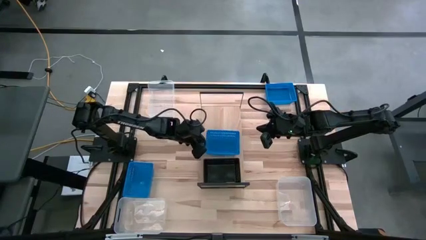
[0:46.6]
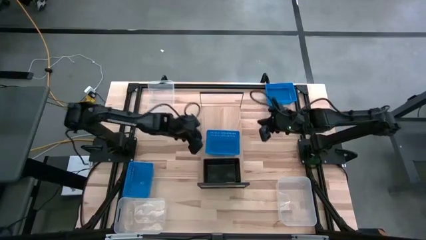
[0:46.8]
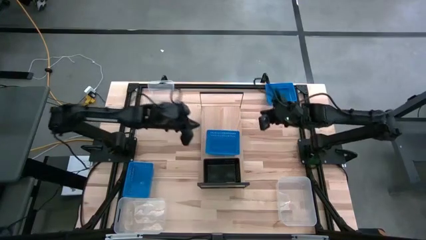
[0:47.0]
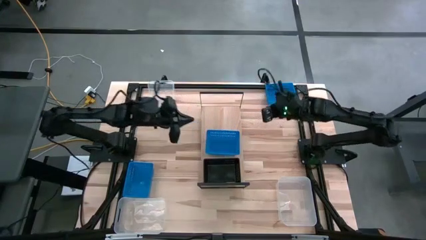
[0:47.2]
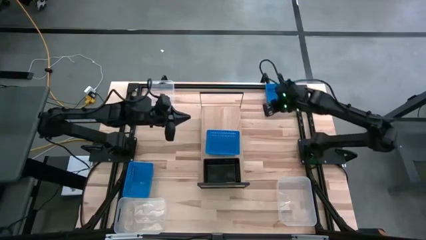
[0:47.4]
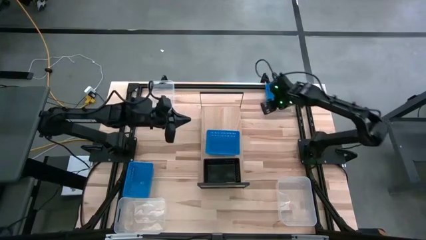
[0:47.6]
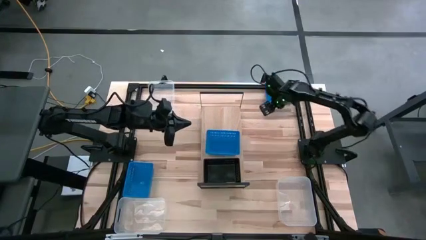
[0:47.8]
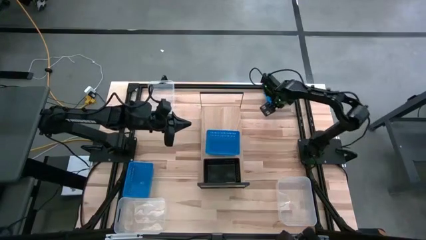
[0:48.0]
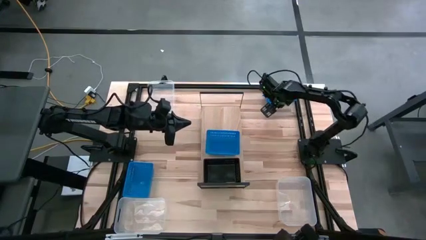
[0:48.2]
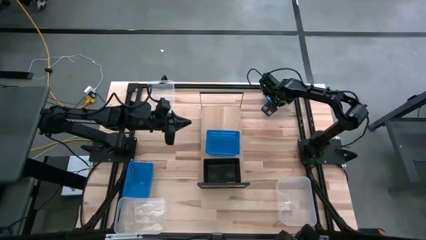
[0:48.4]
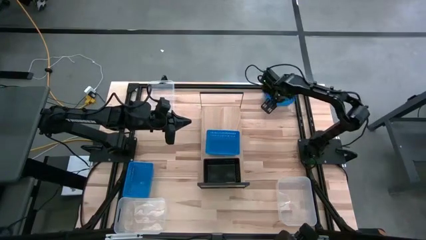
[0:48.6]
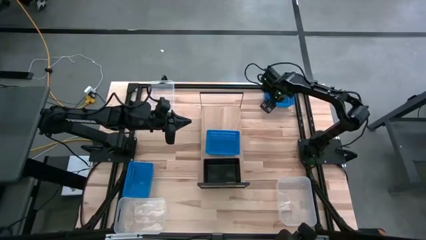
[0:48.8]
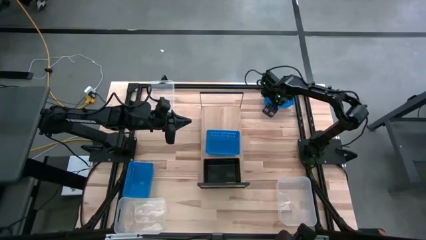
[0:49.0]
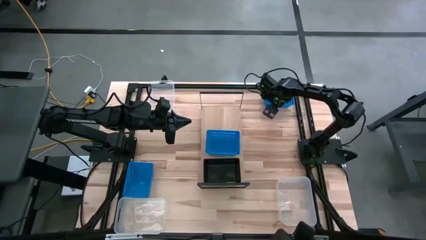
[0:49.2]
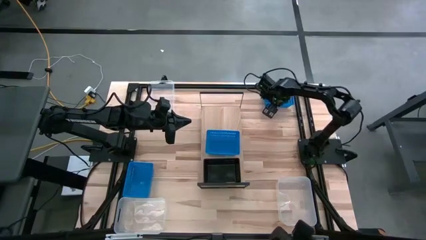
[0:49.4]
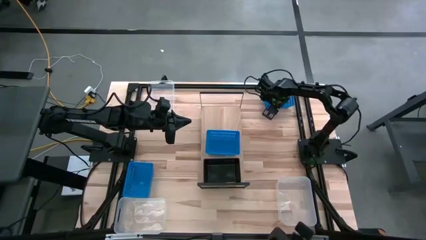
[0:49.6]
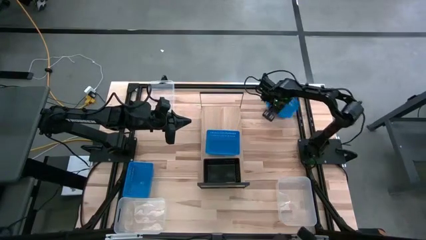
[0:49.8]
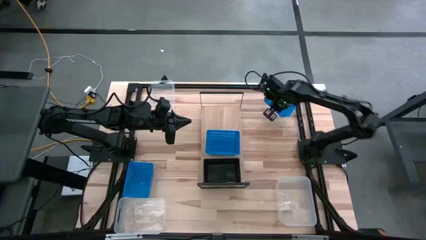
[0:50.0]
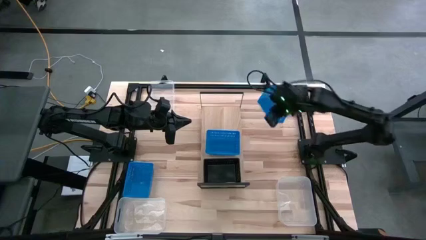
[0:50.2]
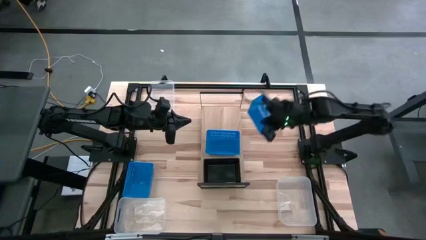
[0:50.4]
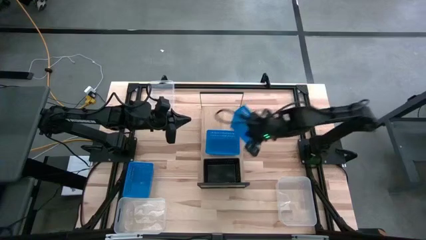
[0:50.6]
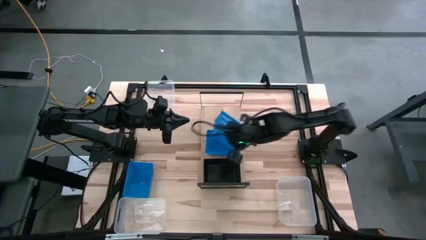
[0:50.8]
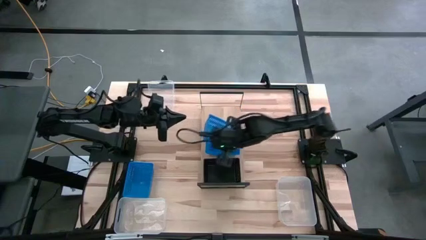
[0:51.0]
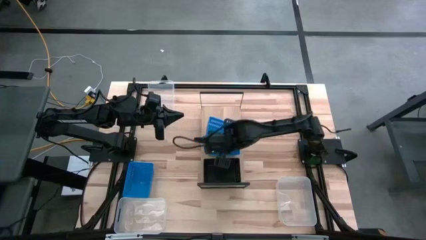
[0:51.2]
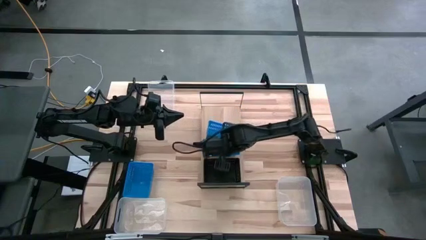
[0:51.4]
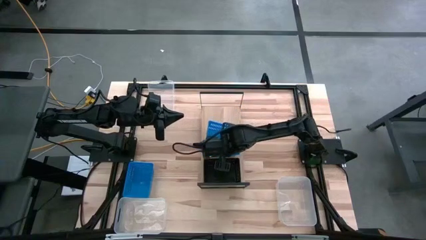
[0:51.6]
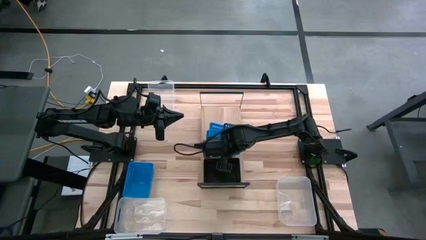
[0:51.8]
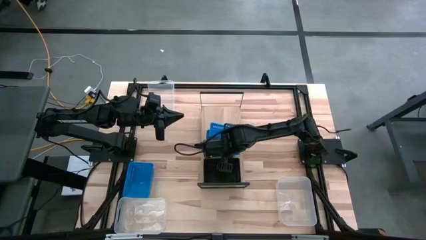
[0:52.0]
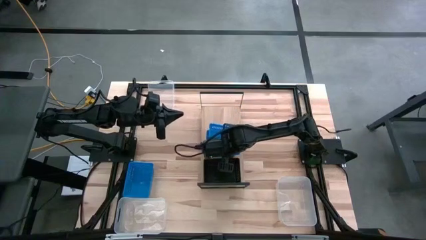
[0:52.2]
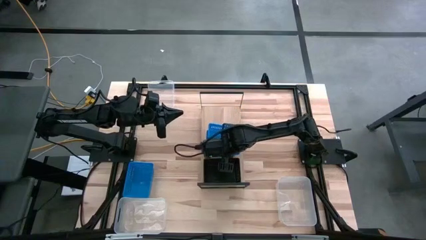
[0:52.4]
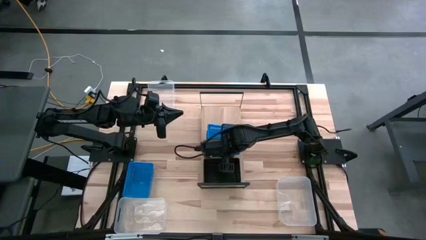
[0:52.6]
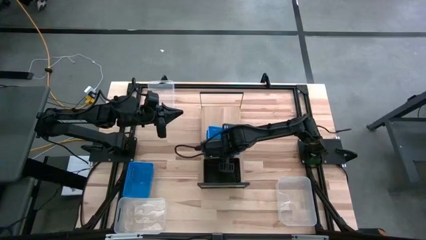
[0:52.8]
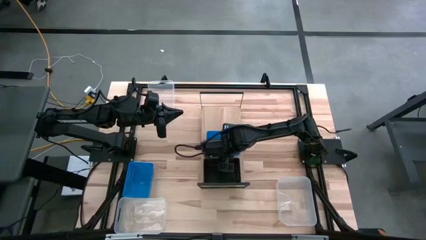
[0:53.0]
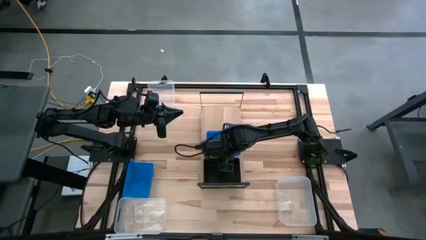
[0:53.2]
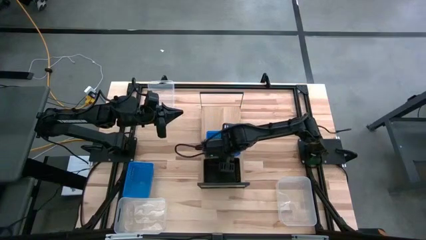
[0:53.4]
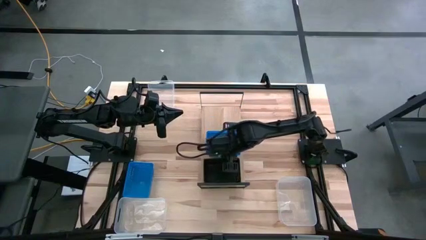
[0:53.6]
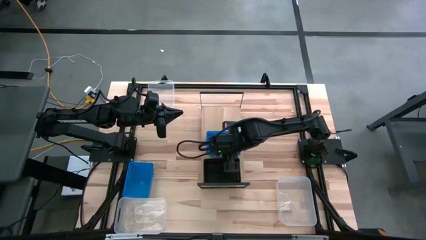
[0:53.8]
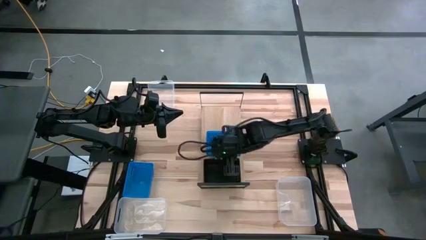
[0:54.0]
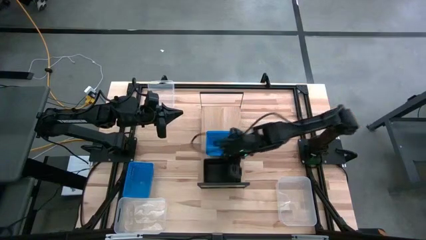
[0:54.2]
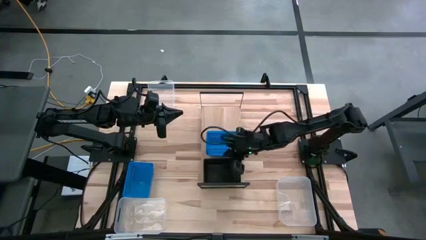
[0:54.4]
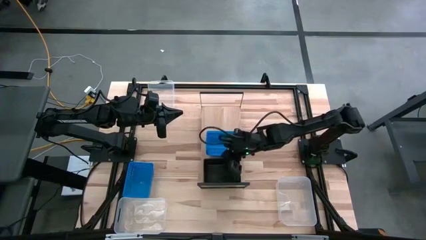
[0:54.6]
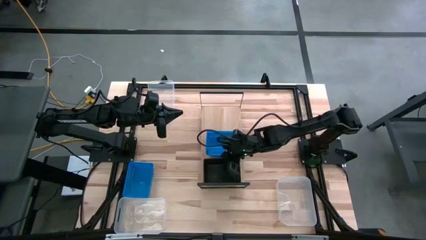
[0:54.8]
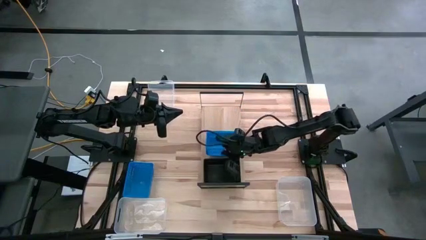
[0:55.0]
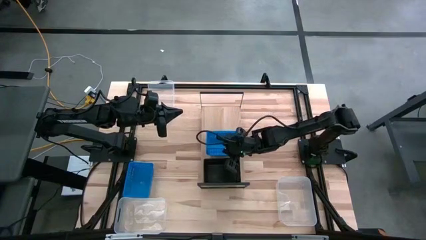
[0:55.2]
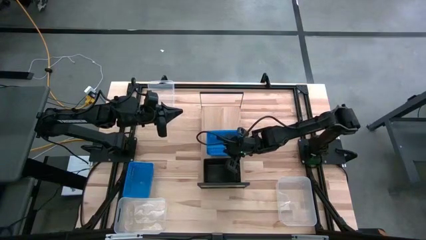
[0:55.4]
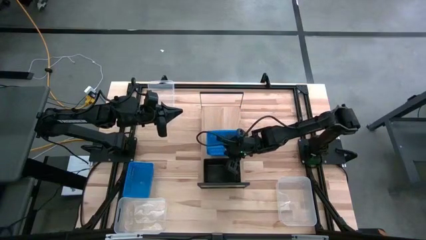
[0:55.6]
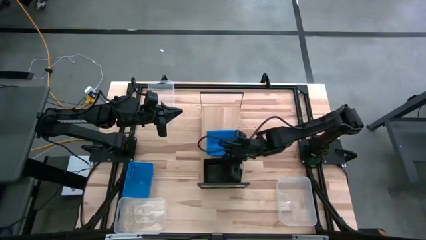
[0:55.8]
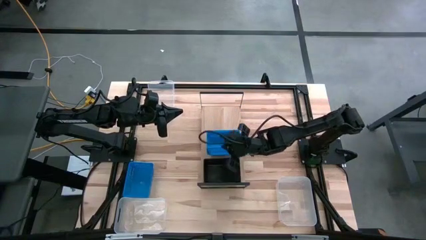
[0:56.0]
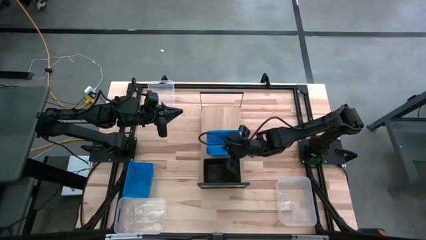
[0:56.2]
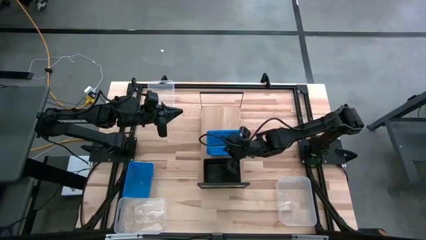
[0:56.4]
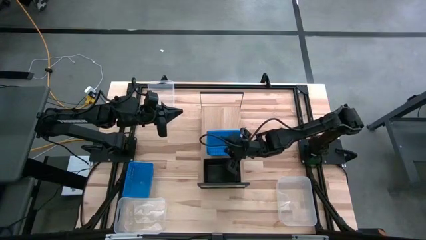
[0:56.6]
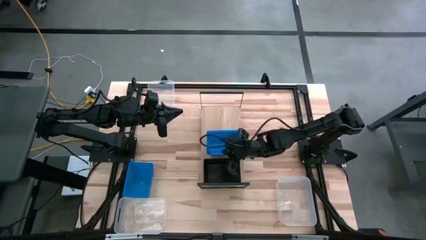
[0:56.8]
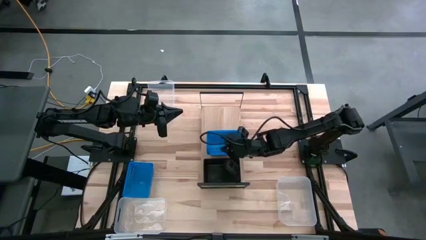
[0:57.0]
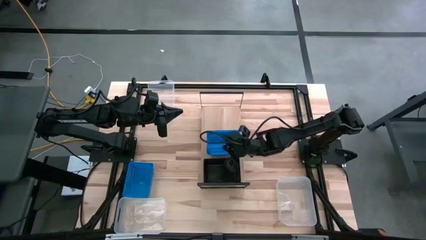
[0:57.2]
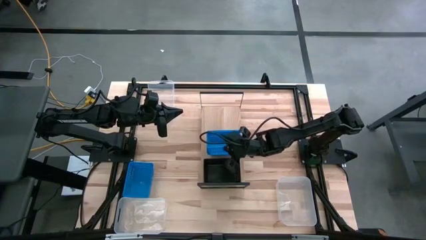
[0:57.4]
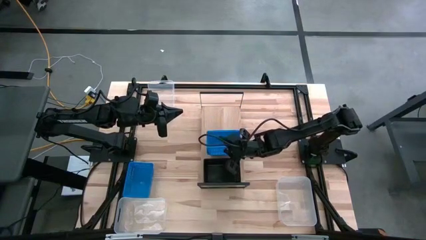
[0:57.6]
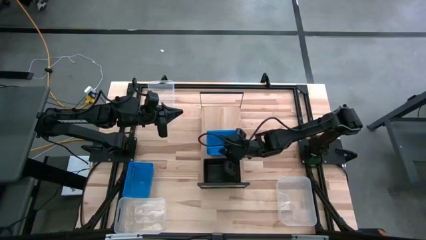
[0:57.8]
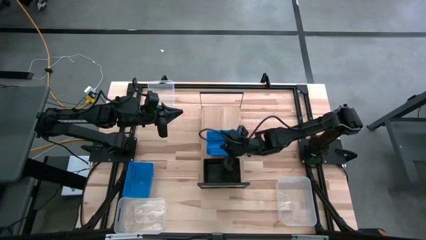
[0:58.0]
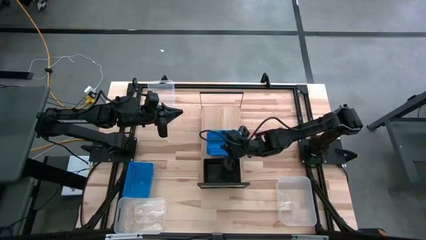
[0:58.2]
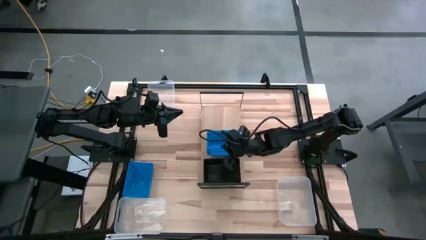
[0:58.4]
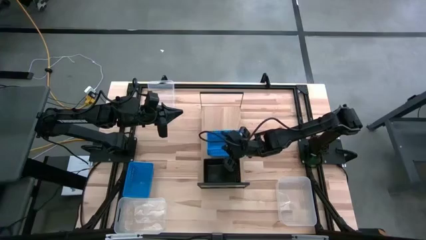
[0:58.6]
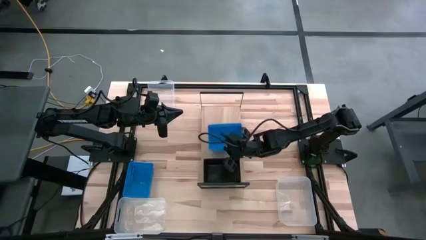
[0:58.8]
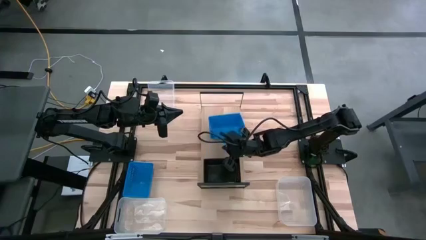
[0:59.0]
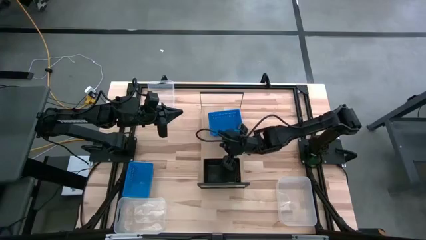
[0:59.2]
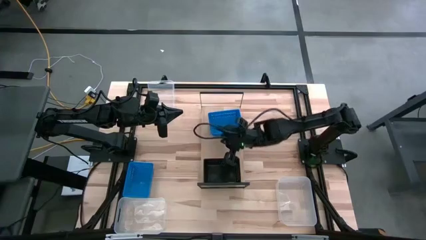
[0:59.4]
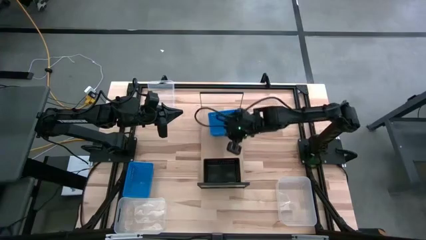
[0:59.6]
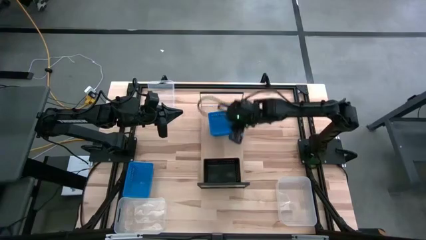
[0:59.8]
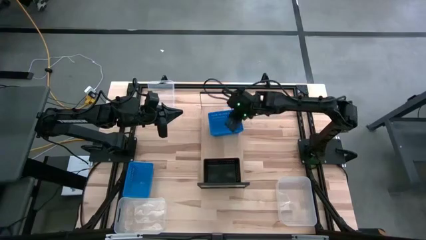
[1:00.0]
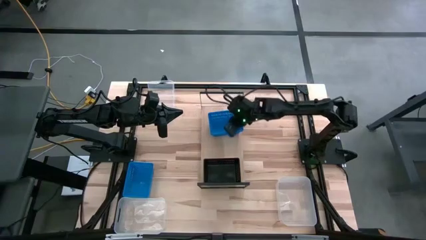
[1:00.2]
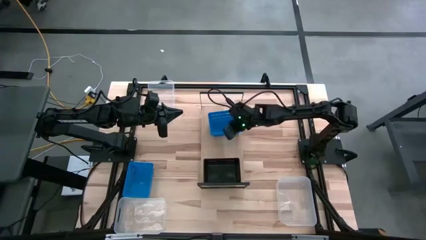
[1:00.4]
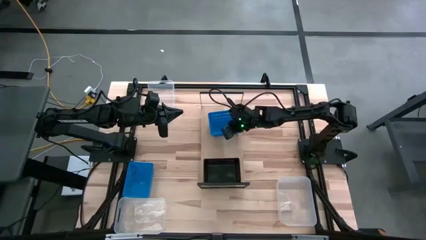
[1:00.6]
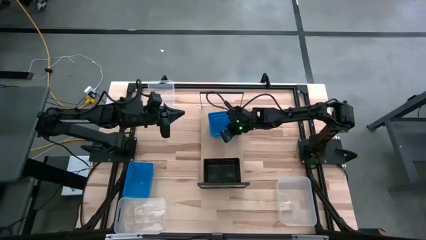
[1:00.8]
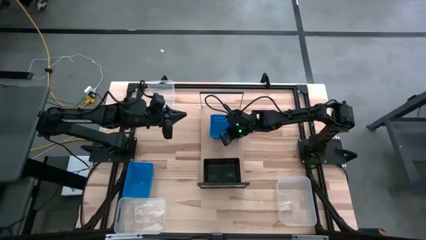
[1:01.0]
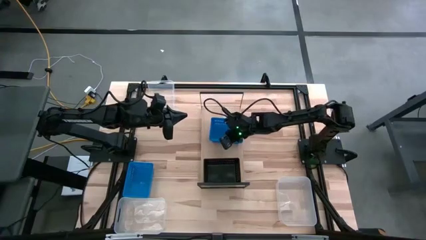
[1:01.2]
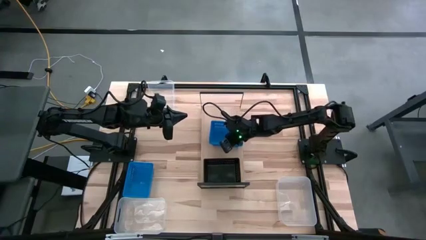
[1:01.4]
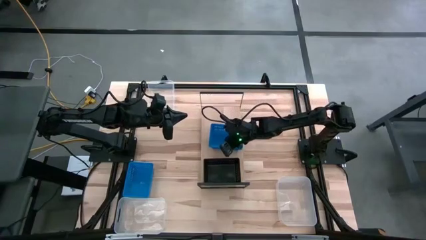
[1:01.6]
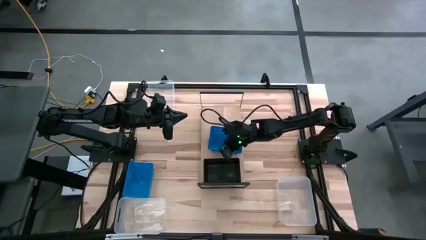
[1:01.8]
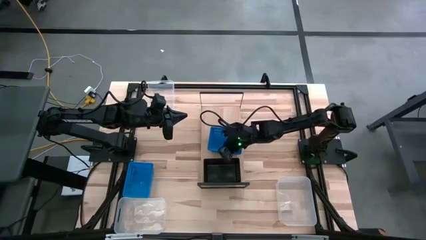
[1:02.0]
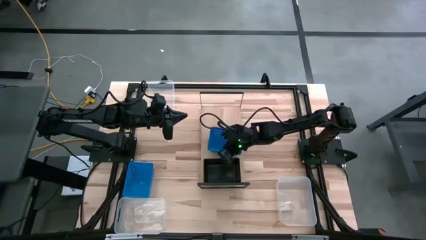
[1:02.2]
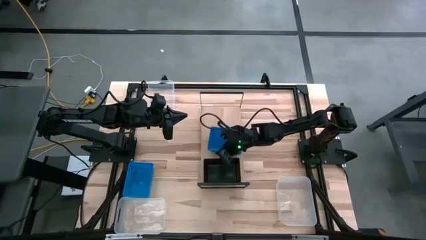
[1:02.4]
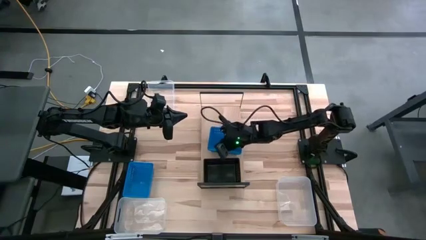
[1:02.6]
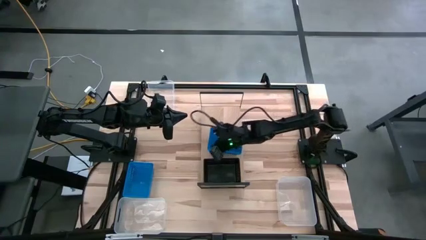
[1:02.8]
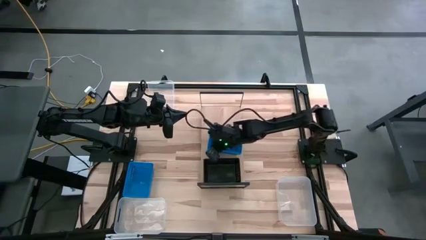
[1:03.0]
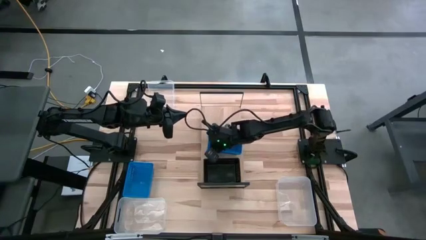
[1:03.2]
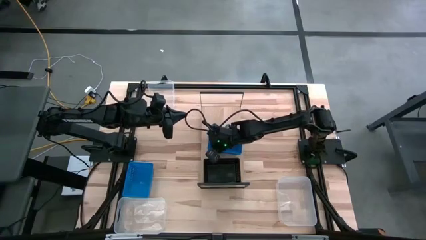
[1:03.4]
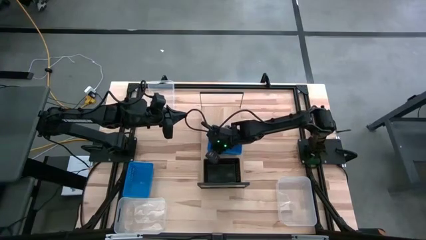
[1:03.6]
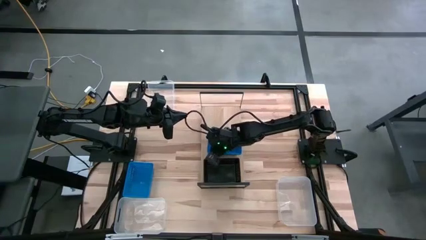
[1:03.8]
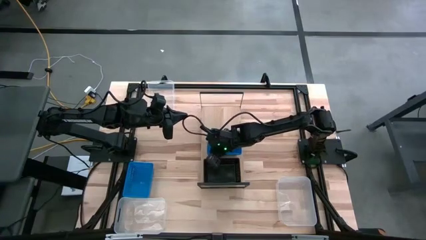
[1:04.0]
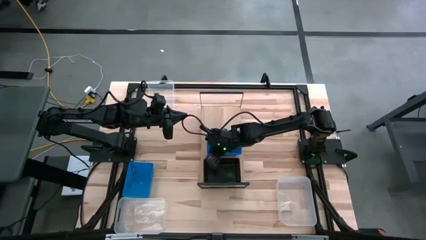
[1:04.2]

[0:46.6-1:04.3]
Task: Stack baskets on shelf by color
Stack the right blue bin on top of the other blue bin on the shelf
